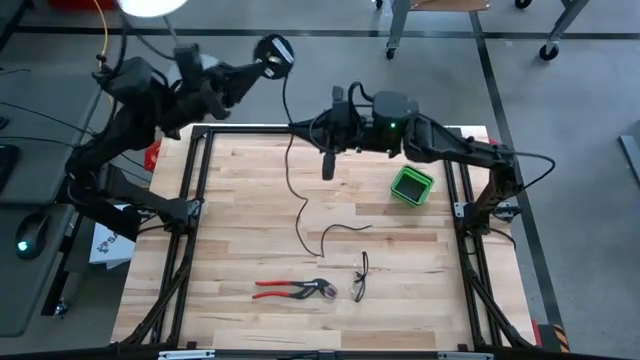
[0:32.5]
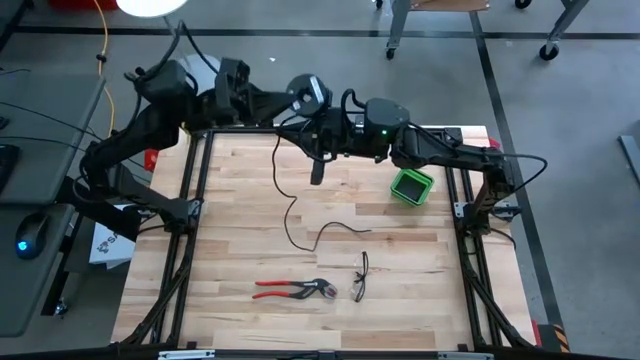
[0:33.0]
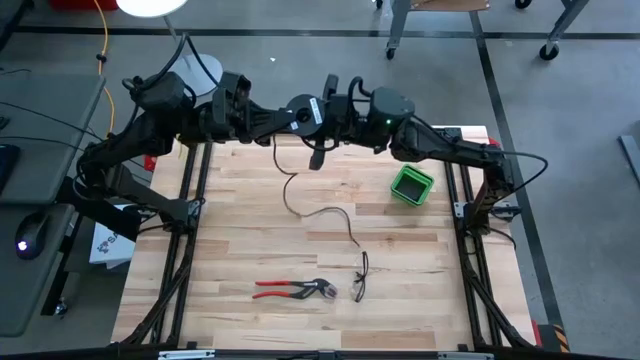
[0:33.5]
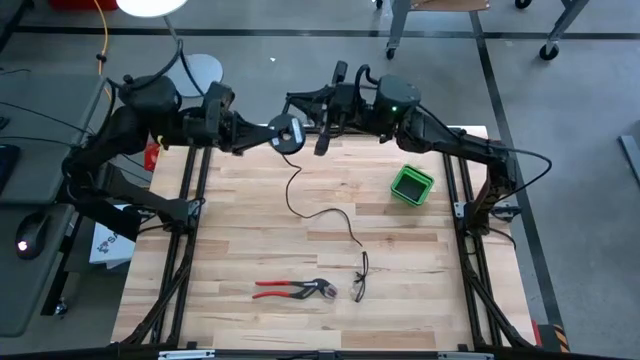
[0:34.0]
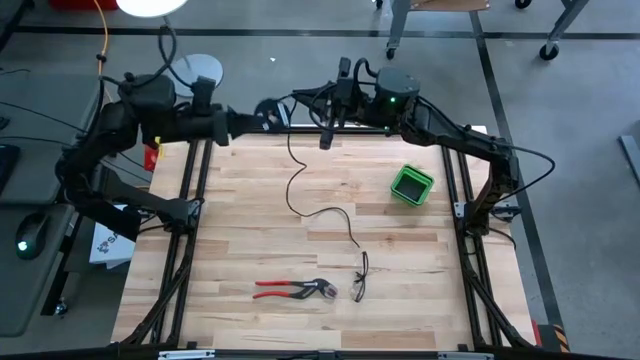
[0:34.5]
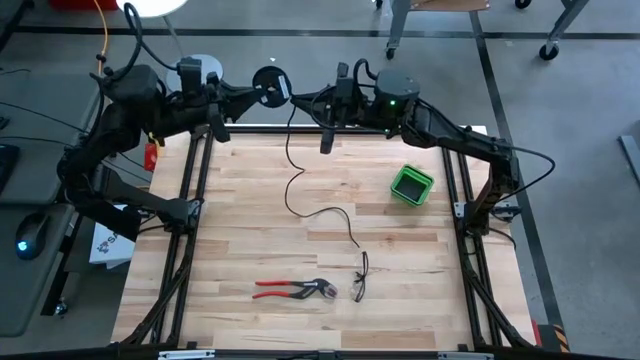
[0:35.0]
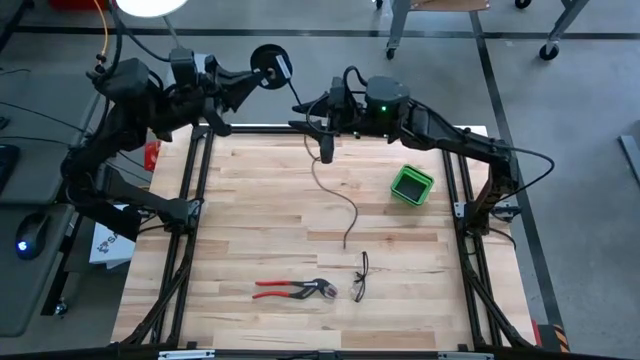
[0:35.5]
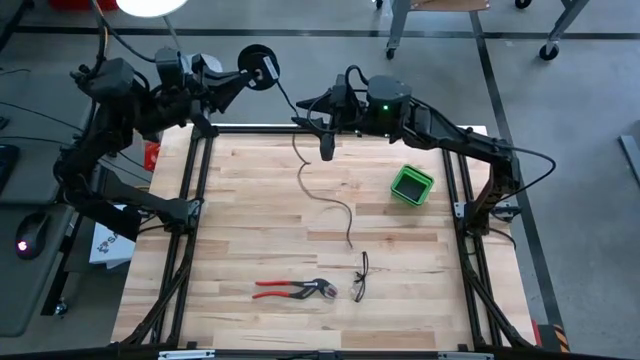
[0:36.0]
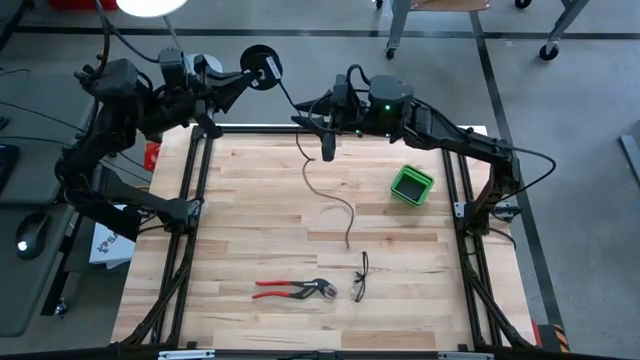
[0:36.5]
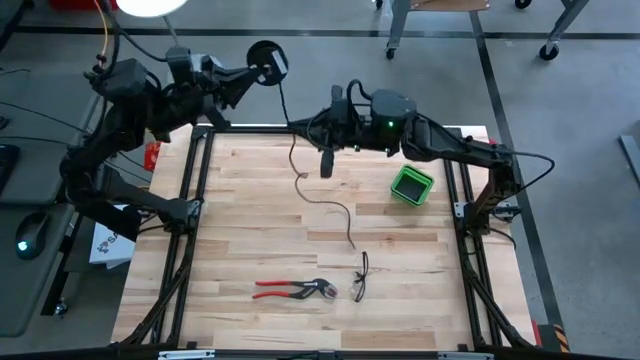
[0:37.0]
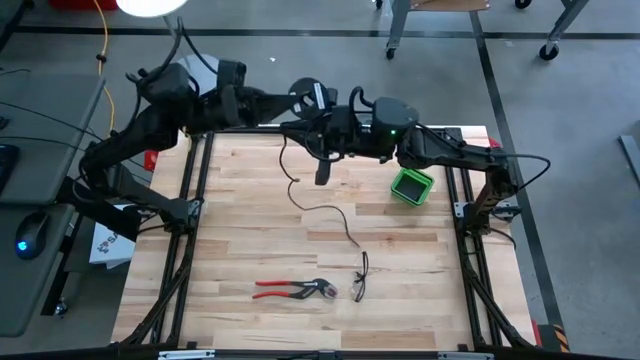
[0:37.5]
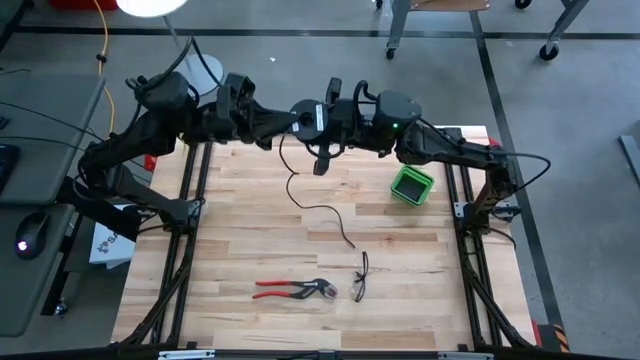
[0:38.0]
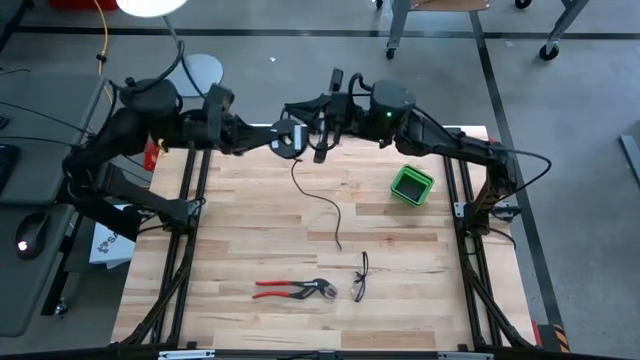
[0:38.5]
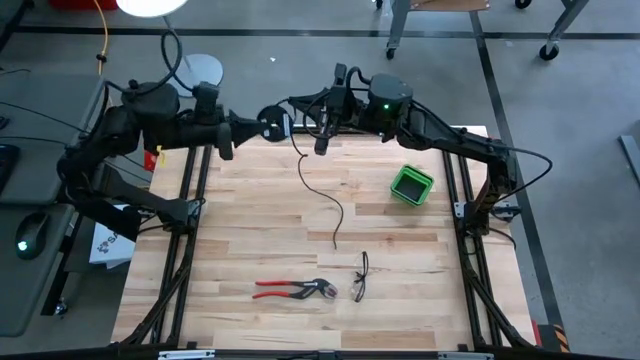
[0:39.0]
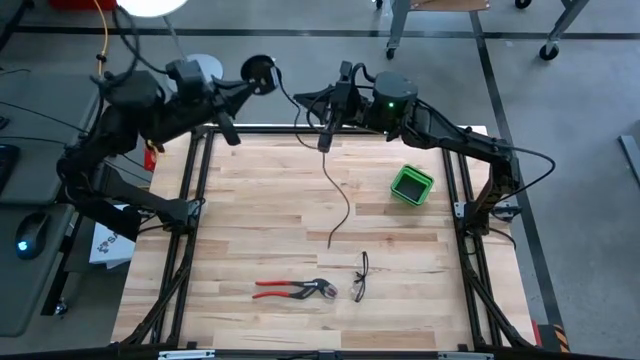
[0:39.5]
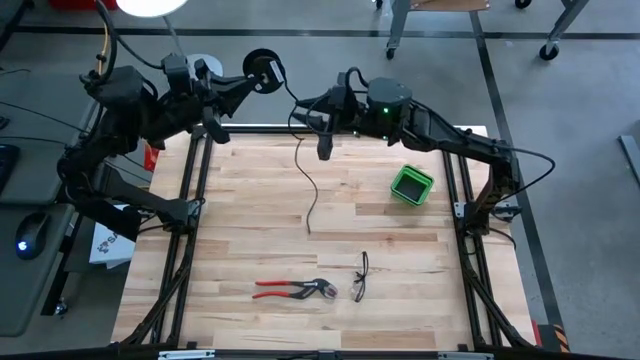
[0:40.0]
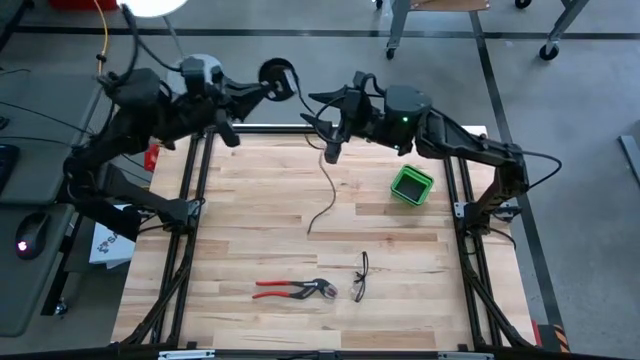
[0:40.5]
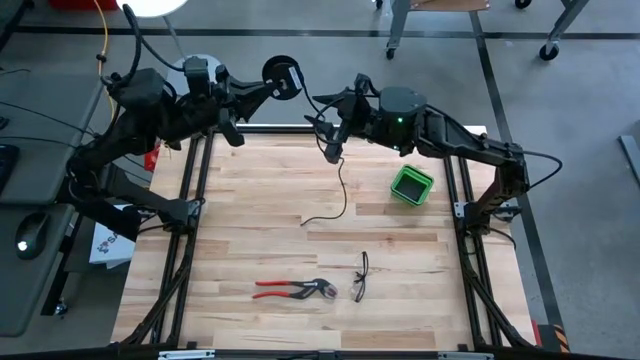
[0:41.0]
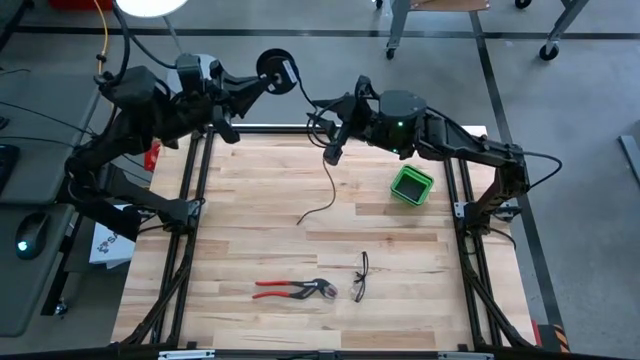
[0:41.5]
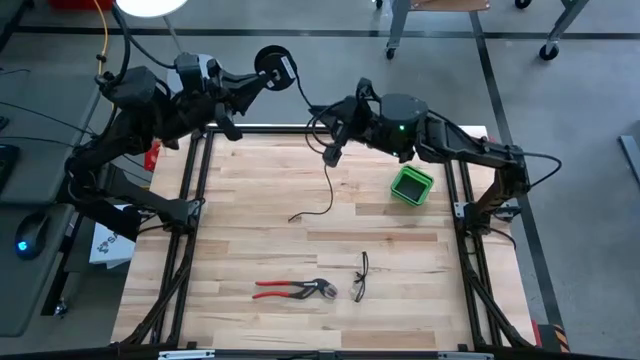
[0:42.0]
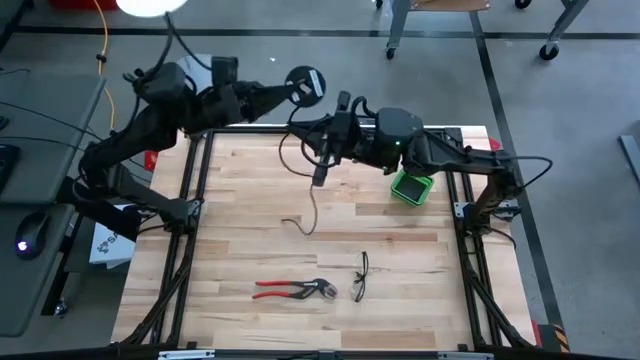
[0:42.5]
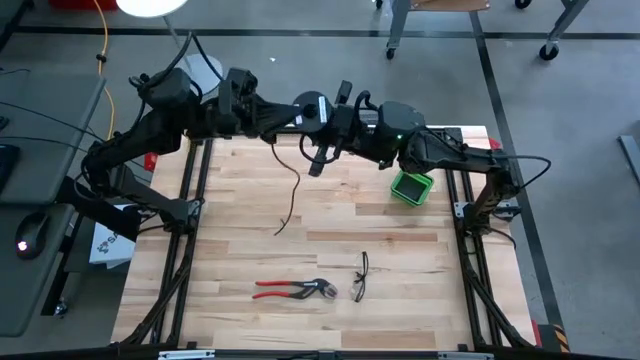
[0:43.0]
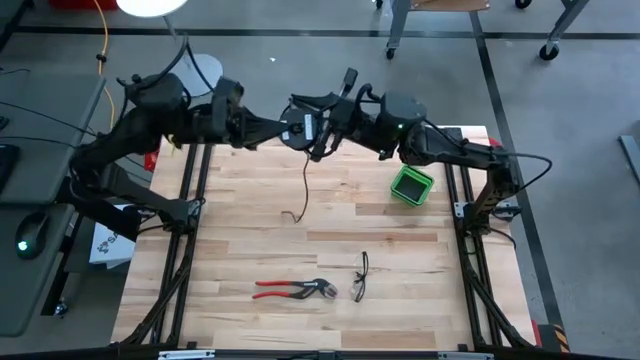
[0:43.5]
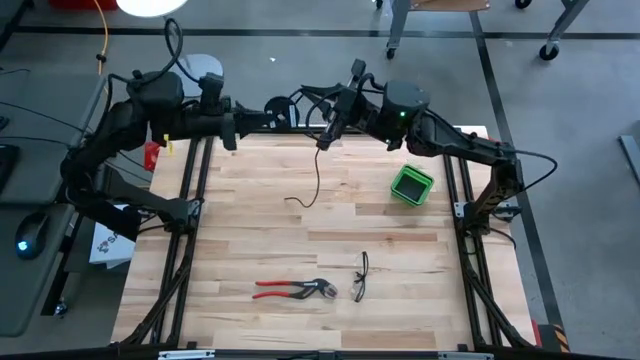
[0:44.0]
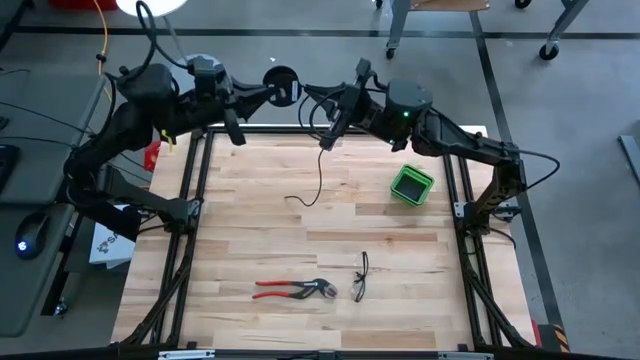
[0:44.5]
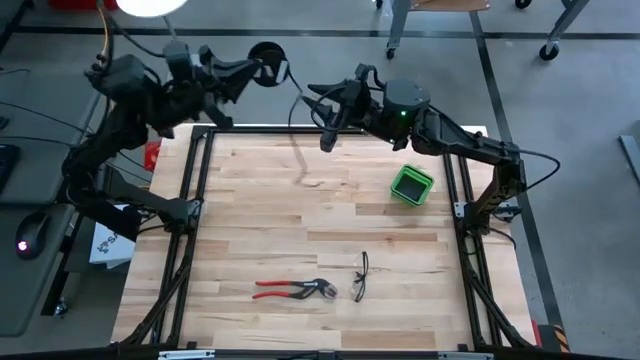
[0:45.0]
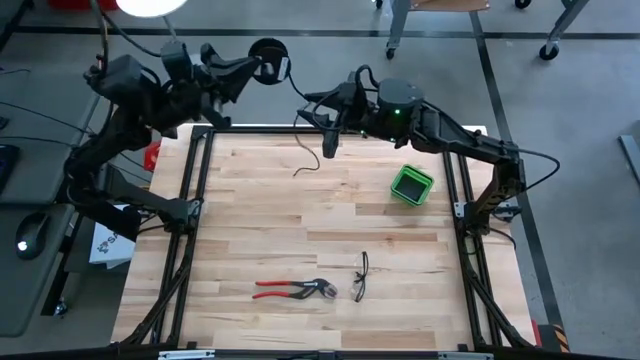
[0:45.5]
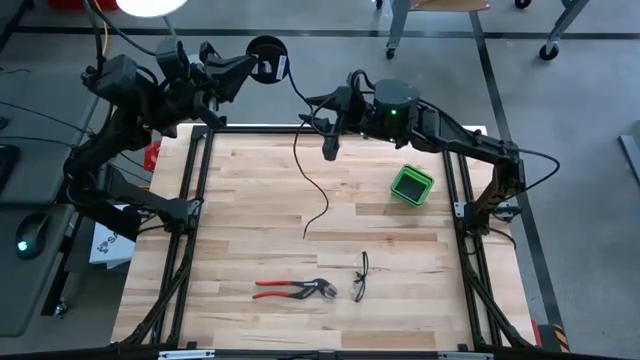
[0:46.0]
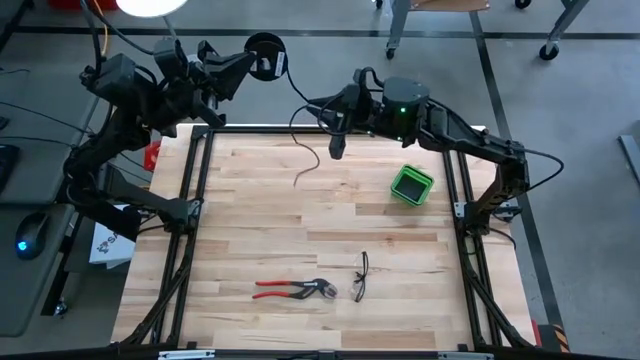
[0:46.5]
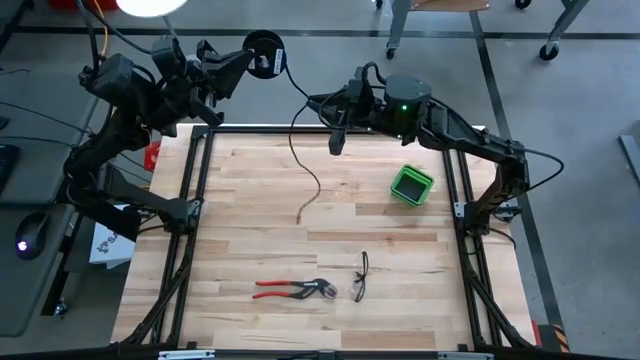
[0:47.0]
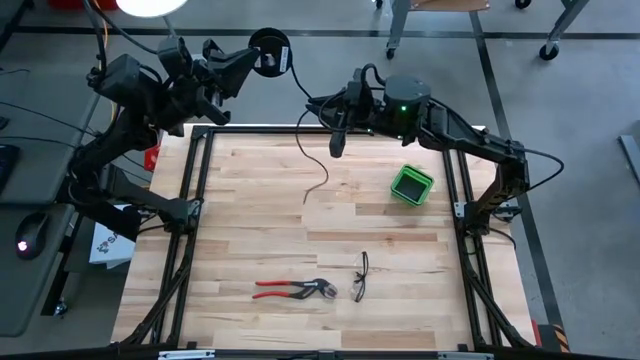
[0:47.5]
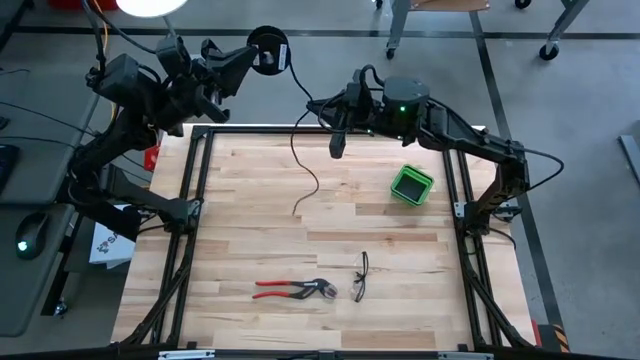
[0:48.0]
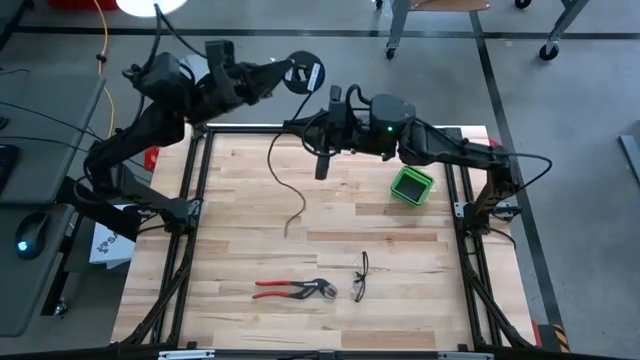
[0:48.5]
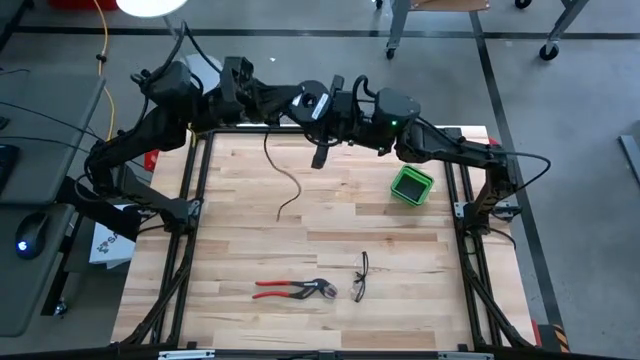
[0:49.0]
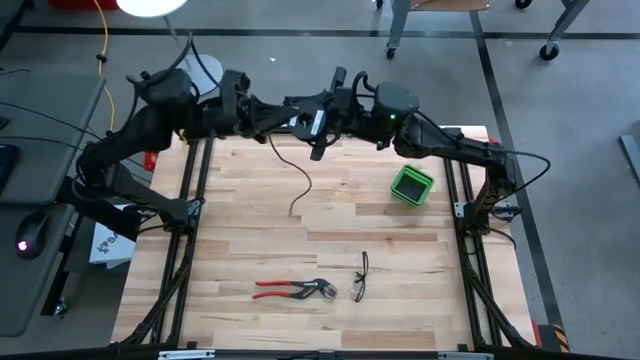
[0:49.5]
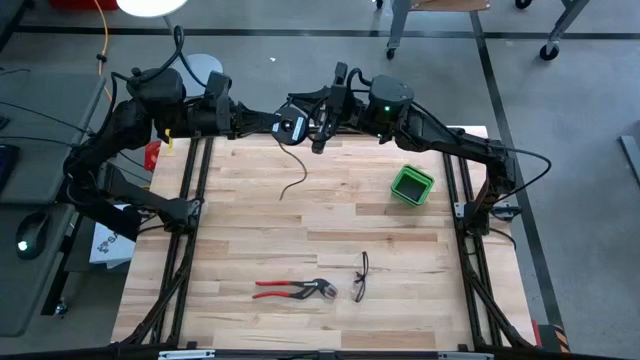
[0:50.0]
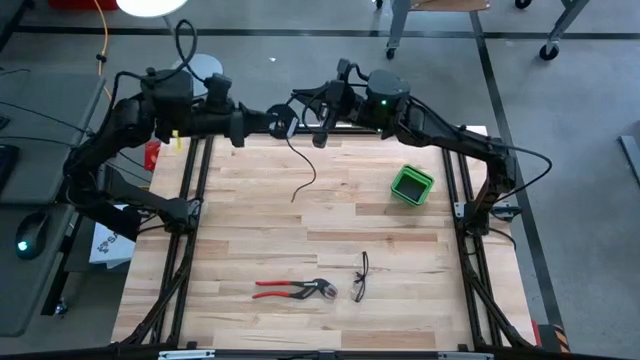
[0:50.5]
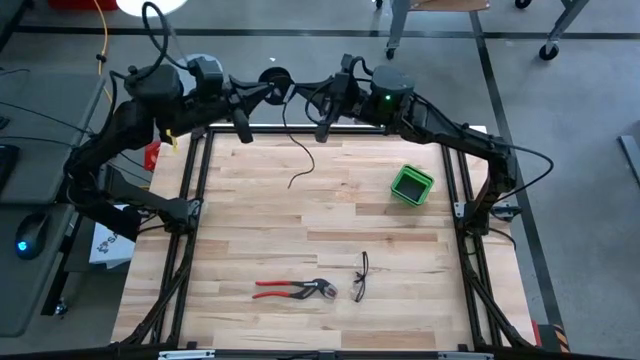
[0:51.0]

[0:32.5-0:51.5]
Task: Coil cords
Coil the black wire on the black spool

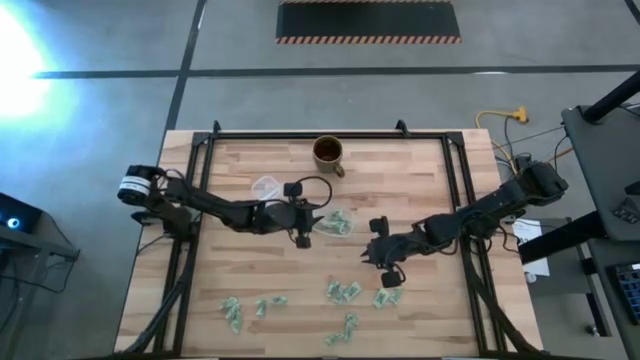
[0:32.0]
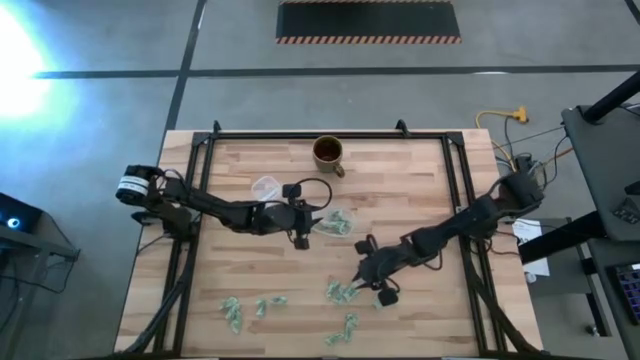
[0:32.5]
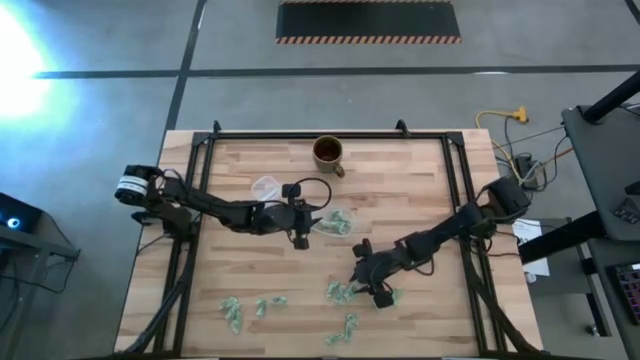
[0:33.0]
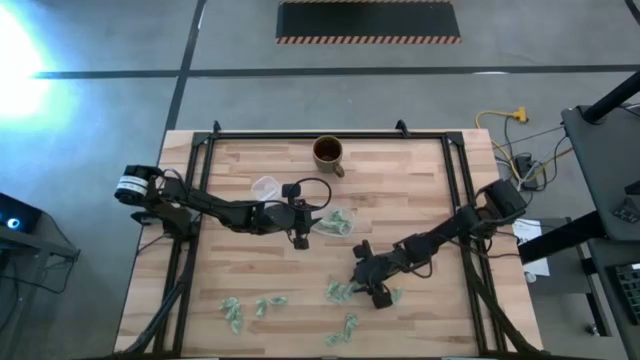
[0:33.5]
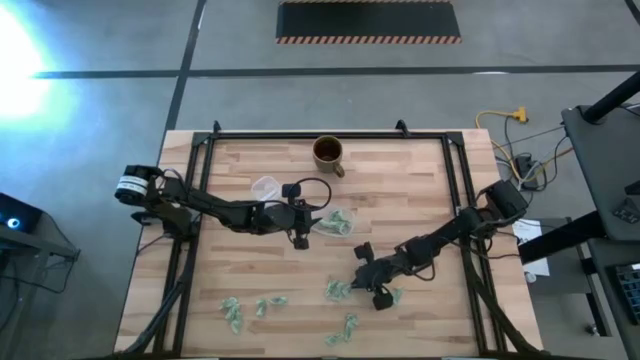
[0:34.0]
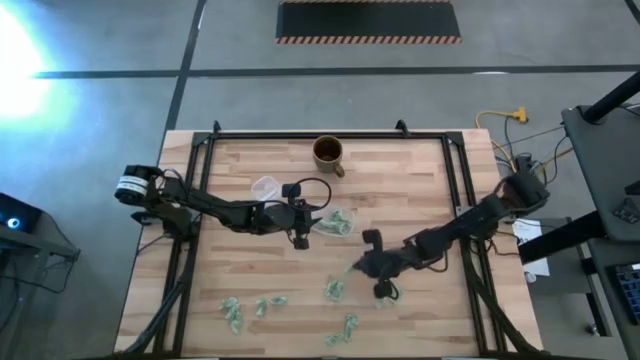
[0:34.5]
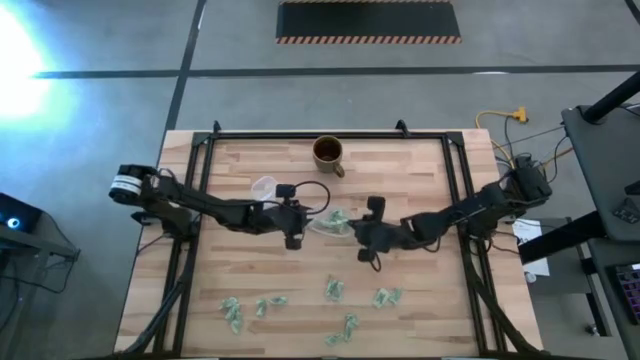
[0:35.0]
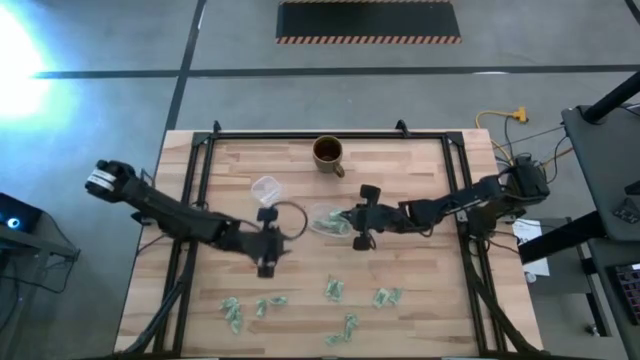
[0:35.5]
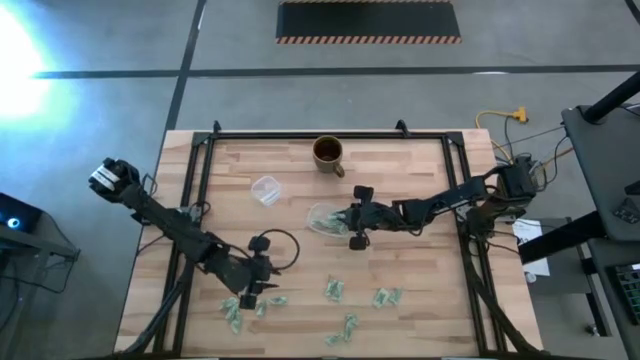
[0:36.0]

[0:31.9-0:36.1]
Task: Pick and place Stevia / Truvia into bins
Put the green stevia packet into the transparent container
